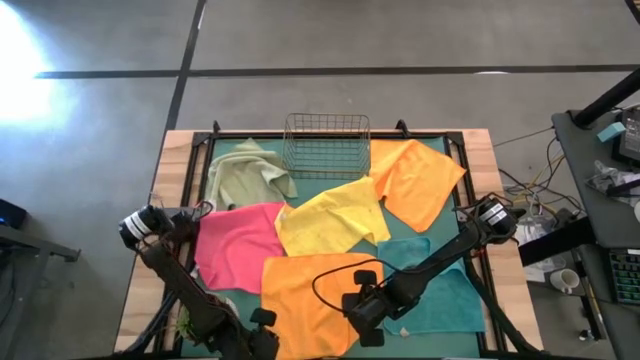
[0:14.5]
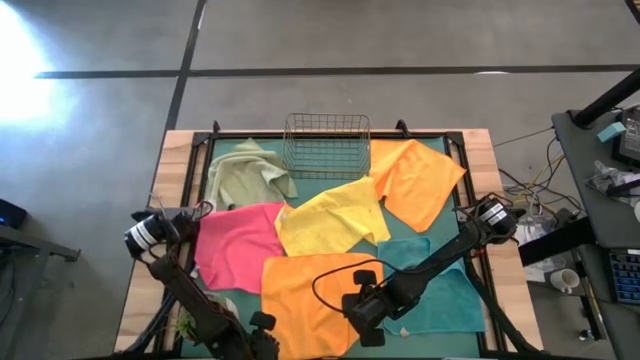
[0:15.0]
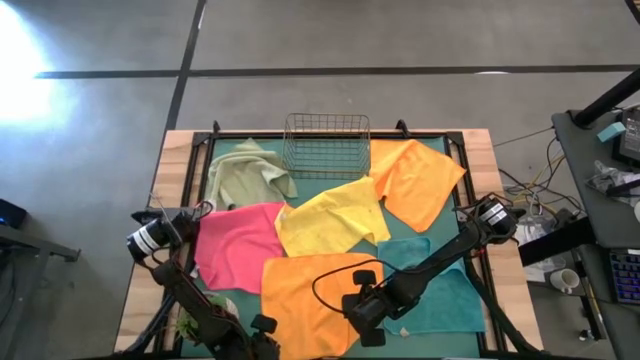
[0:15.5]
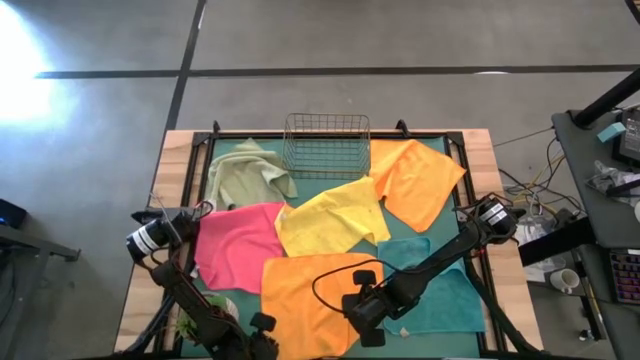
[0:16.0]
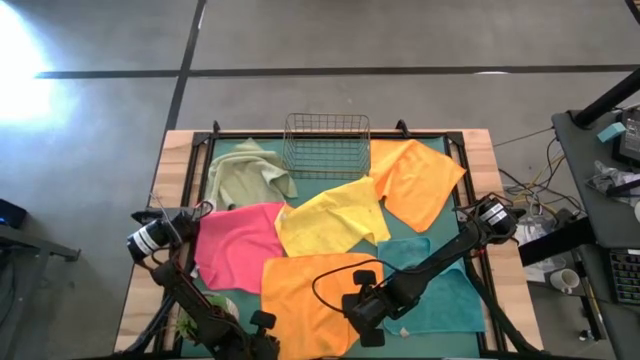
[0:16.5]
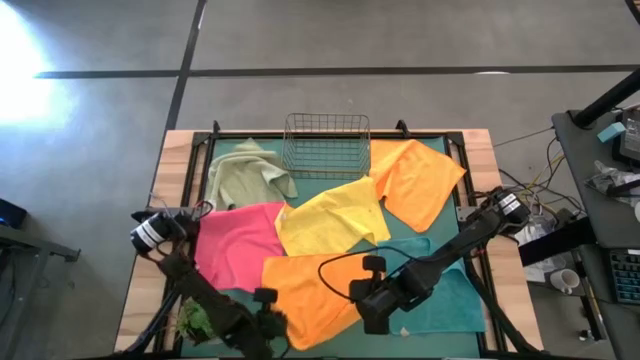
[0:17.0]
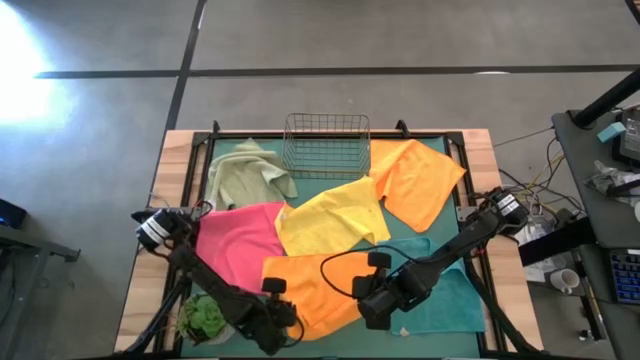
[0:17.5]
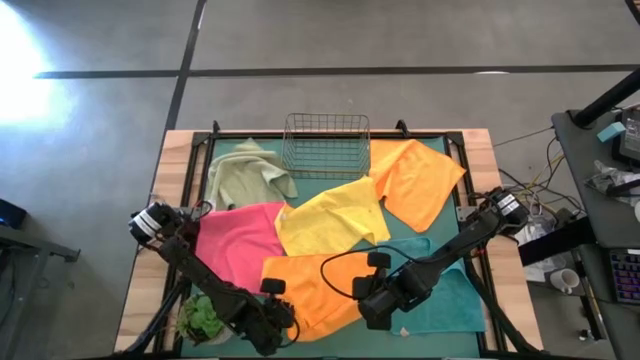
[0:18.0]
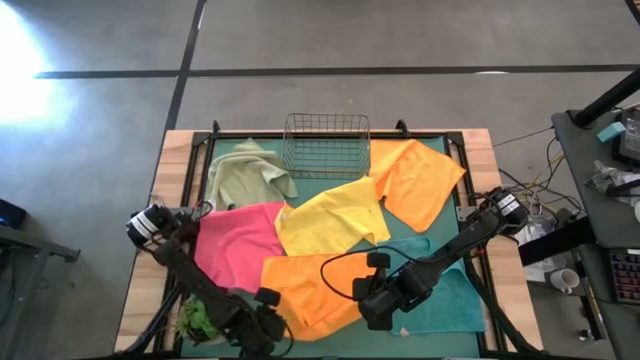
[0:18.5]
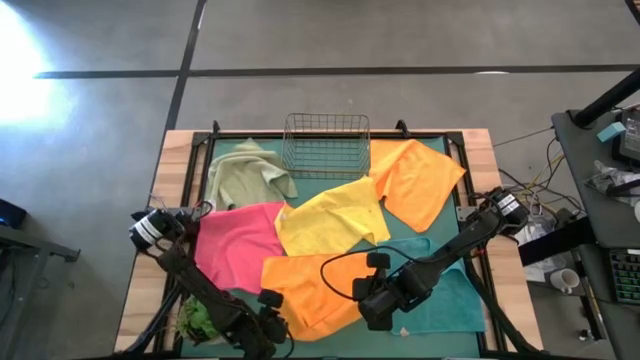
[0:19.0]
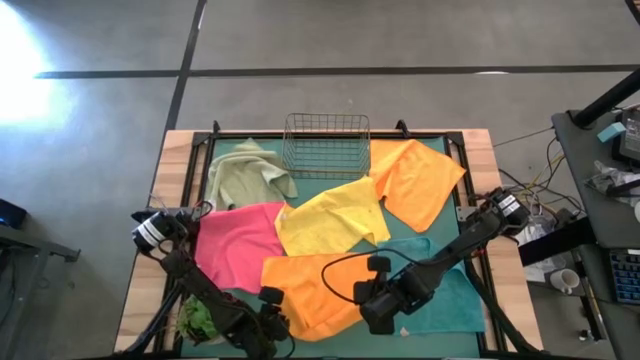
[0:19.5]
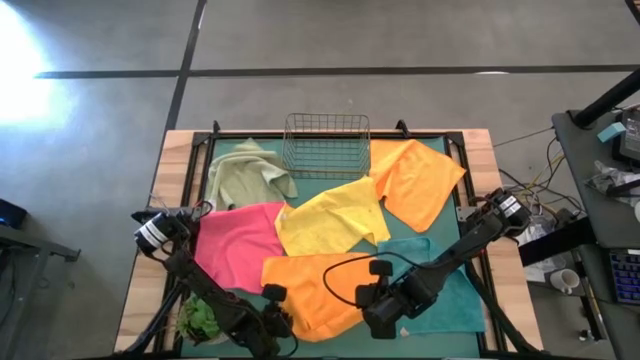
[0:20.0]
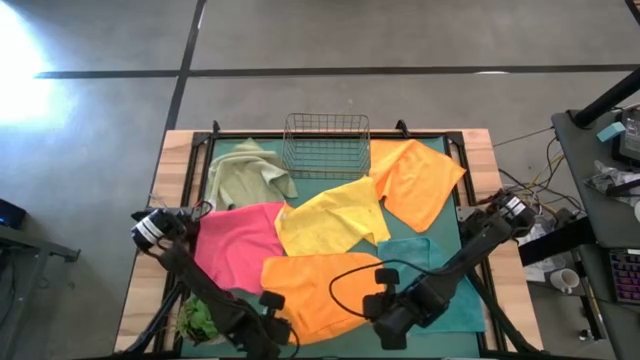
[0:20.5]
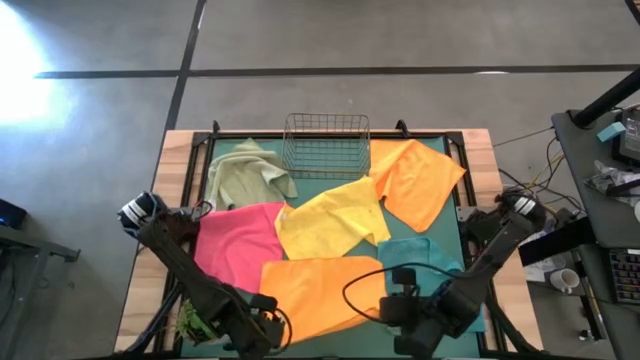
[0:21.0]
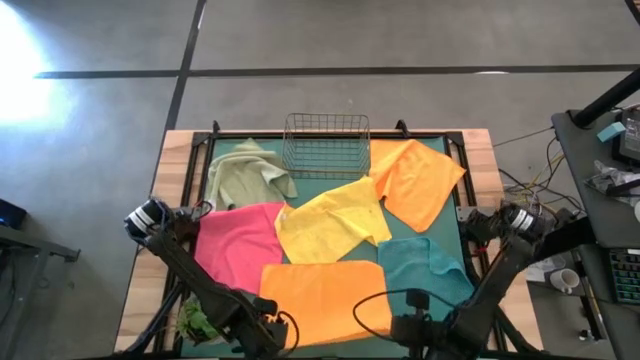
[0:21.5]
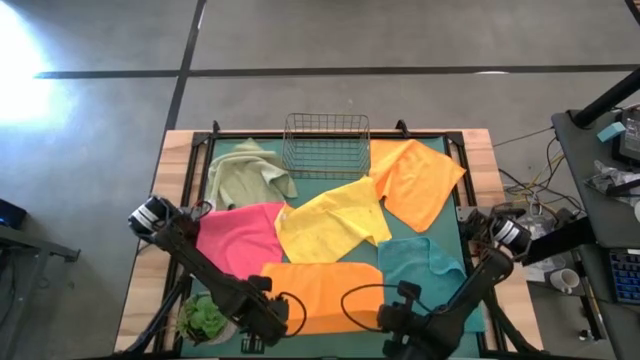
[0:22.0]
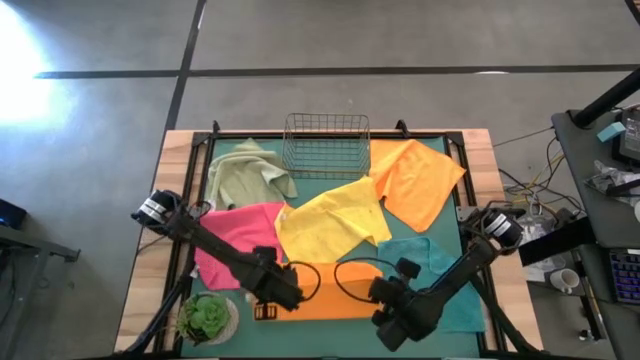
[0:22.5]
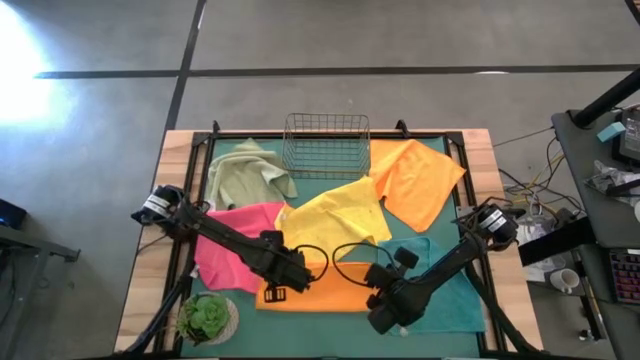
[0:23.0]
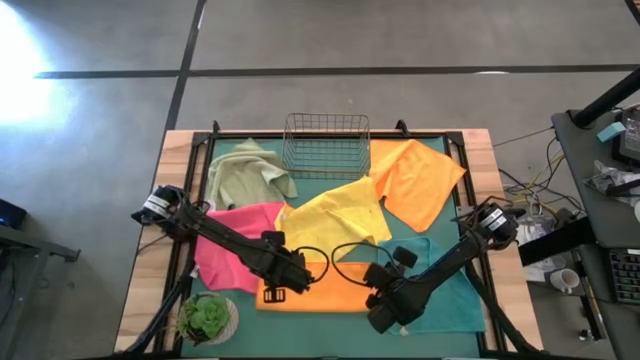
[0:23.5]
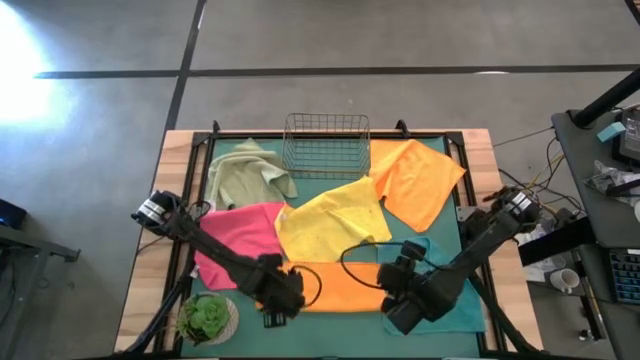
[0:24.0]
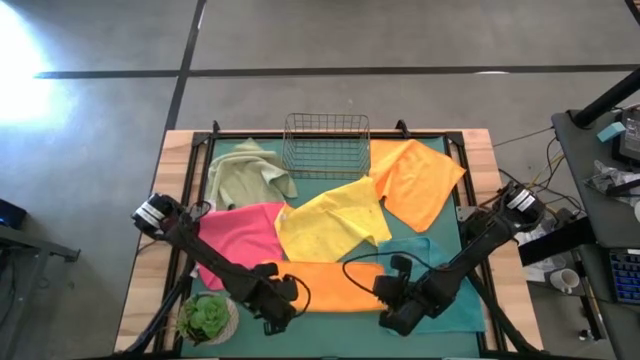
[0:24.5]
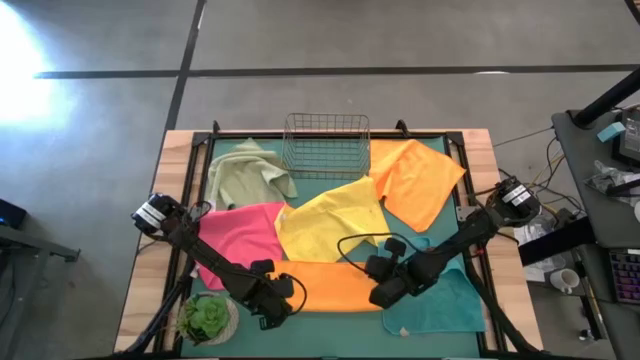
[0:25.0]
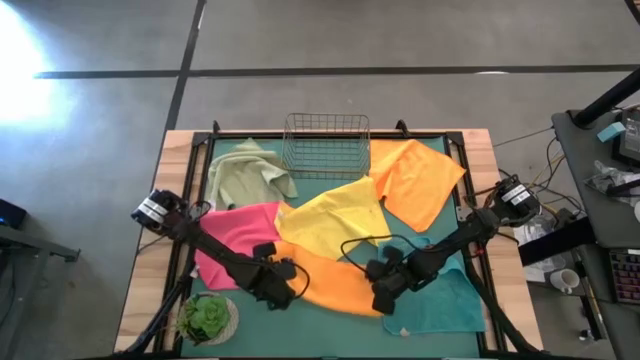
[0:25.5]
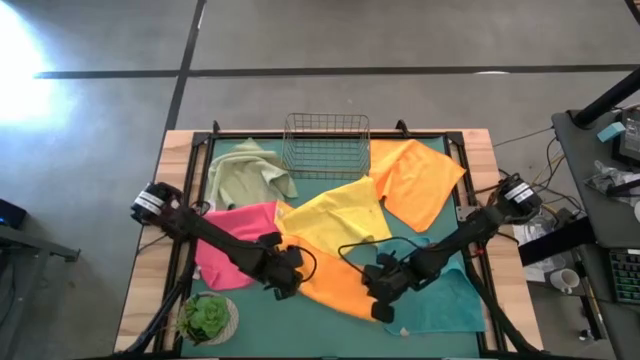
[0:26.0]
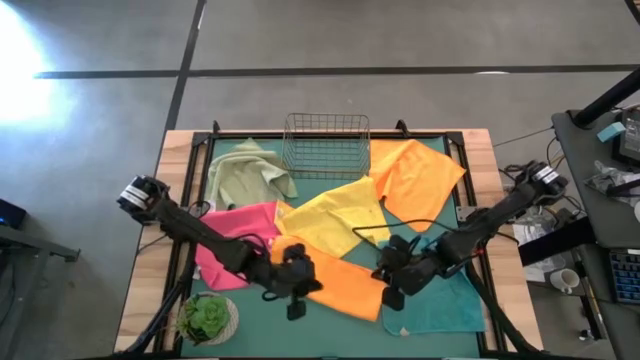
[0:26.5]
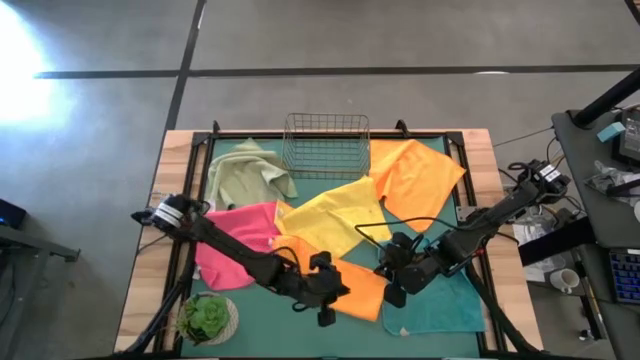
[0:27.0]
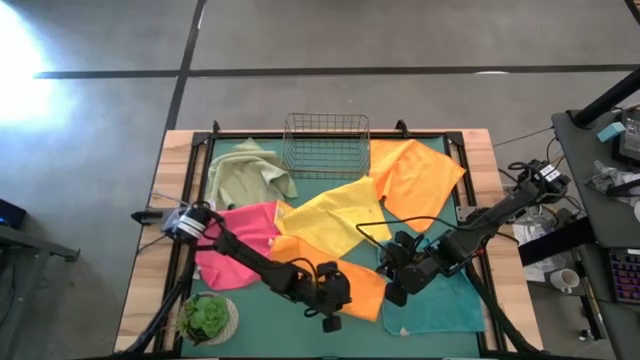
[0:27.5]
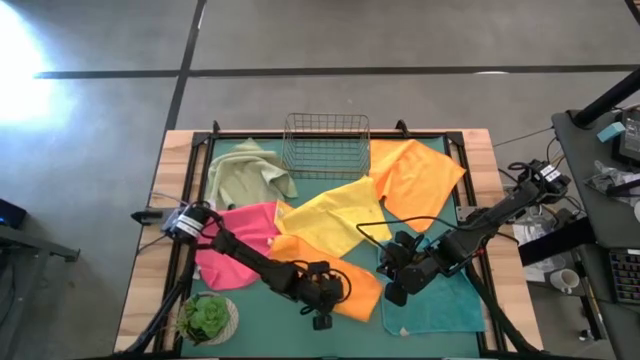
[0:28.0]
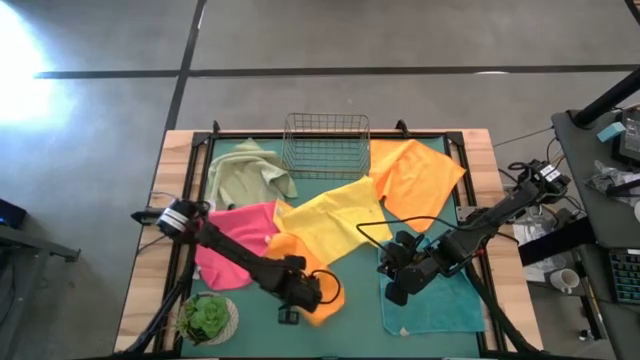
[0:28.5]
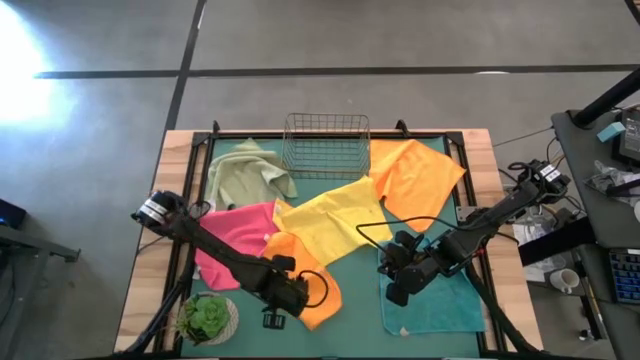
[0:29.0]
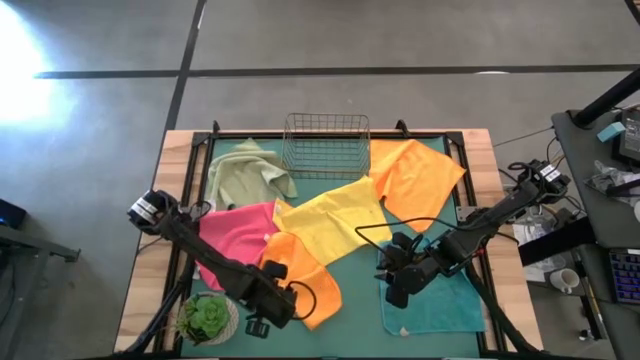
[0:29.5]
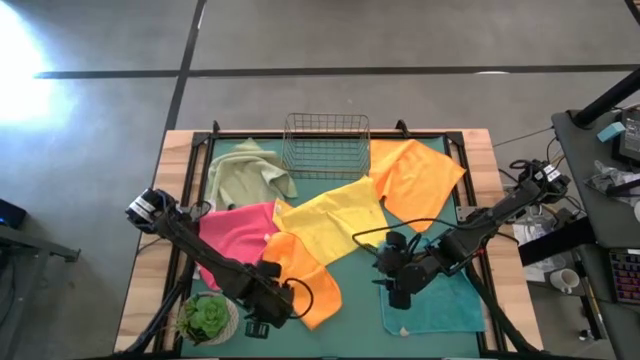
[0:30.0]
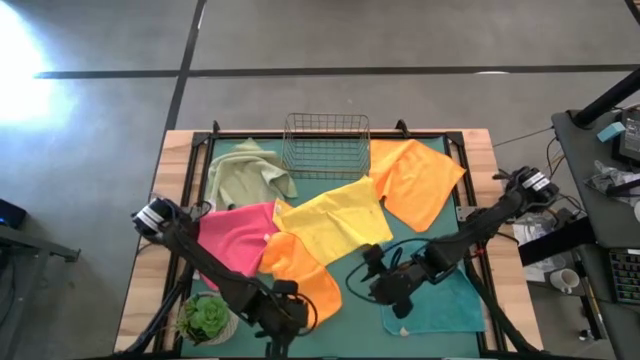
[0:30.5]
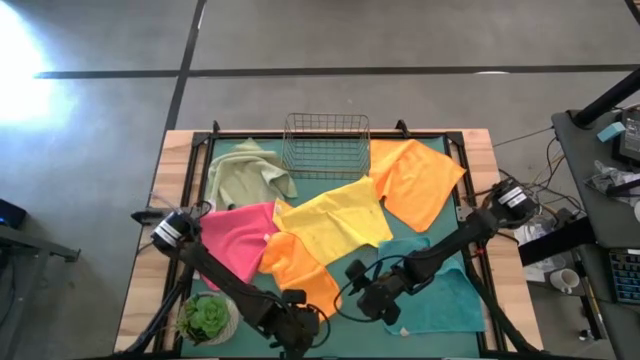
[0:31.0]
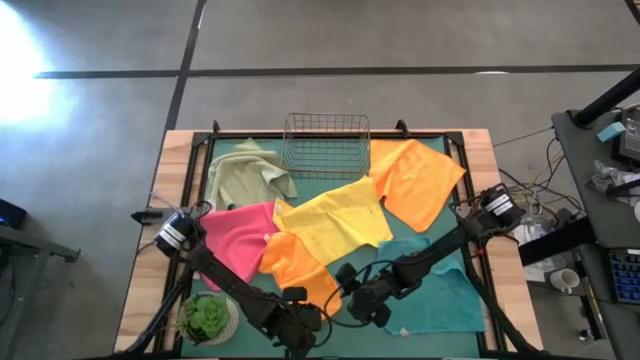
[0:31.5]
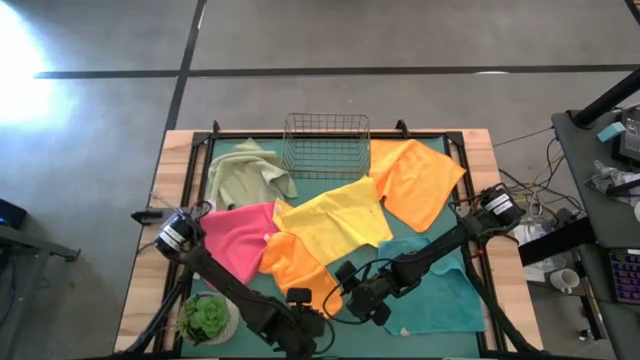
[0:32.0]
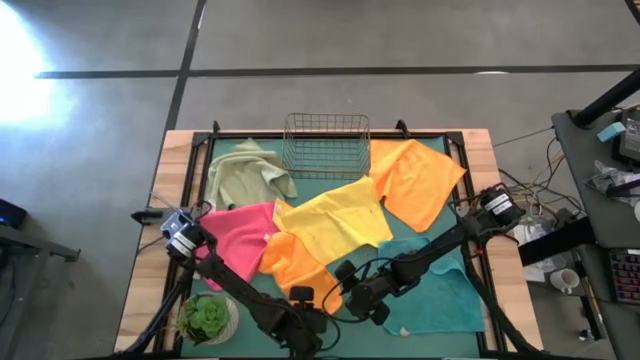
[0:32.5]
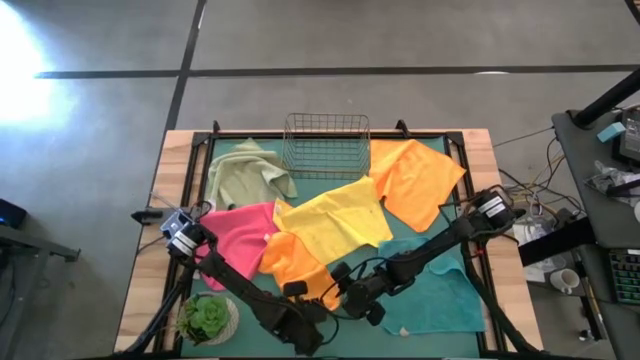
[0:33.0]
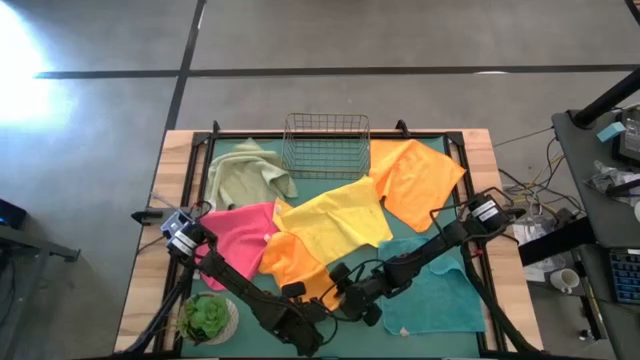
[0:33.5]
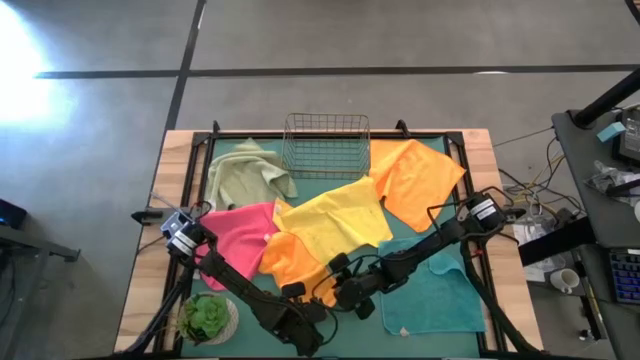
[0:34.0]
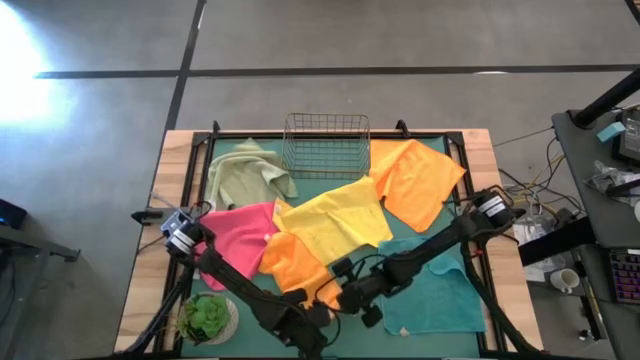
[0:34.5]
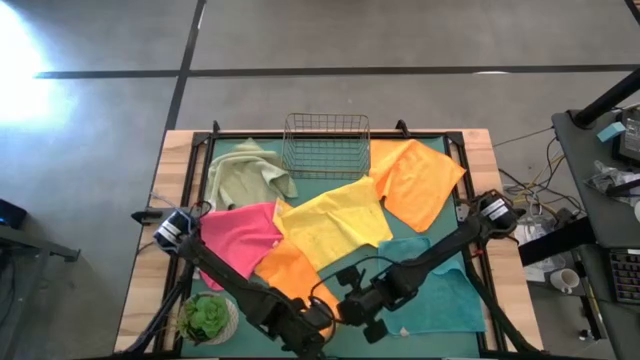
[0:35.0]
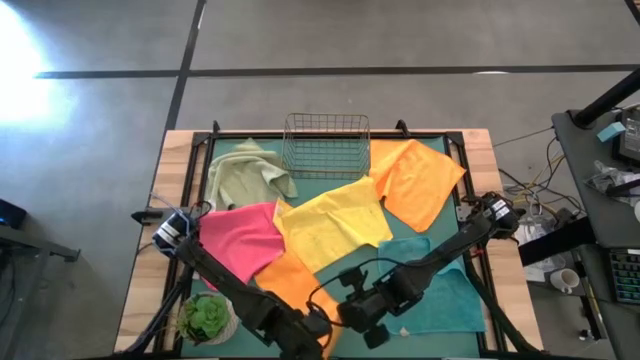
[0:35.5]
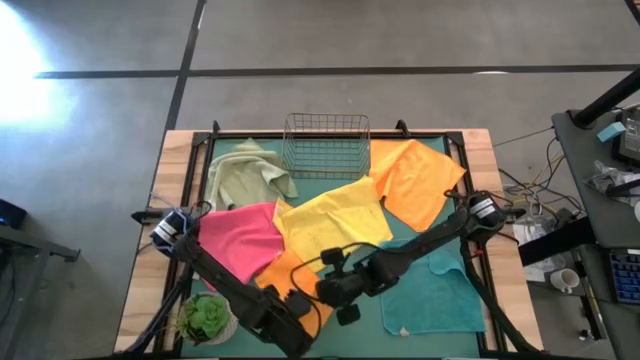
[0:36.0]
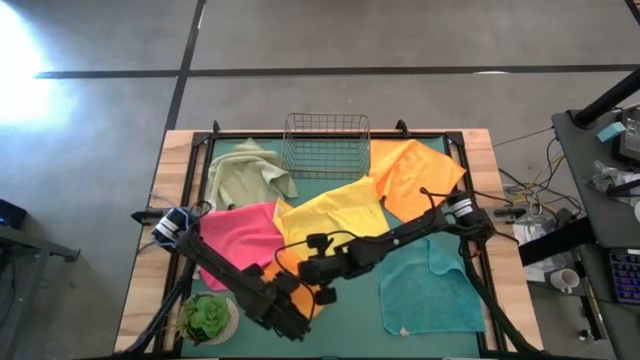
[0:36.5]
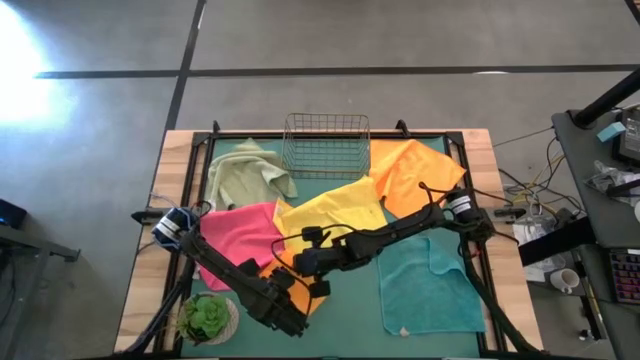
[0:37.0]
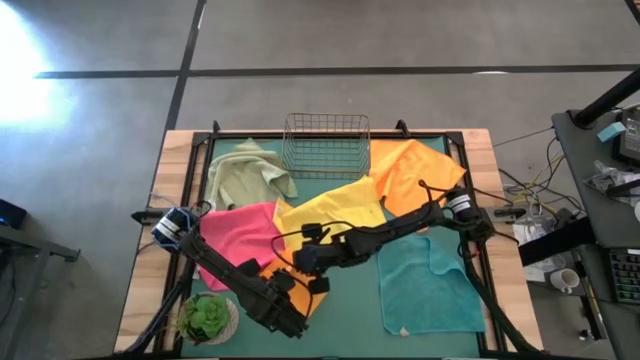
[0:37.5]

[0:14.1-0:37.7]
Task: Fold microfiber towels
Fold the bottom orange microfiber towel
